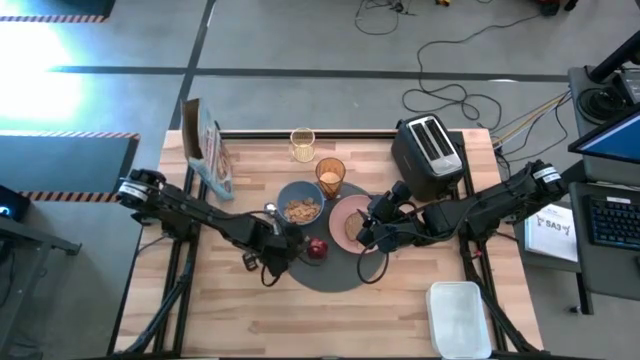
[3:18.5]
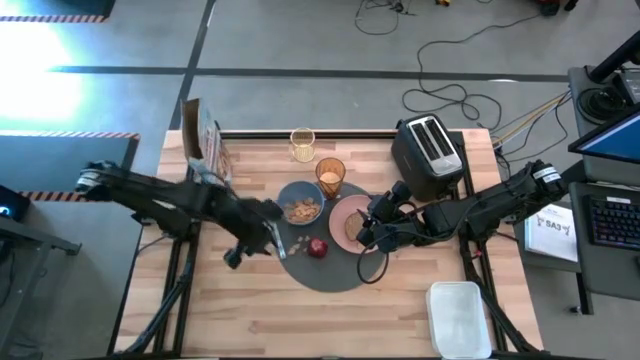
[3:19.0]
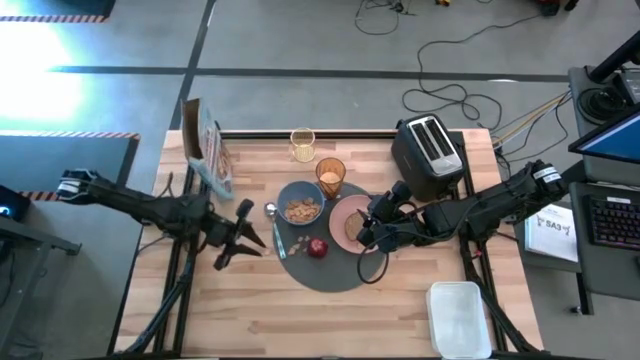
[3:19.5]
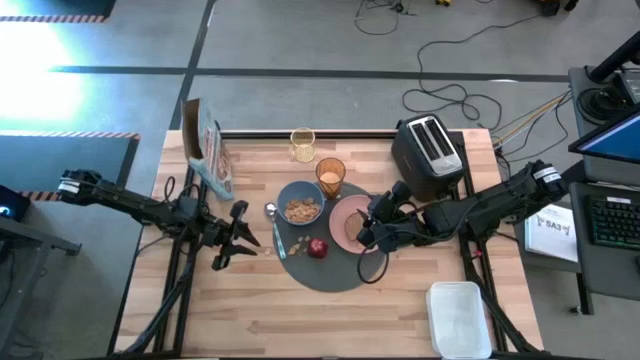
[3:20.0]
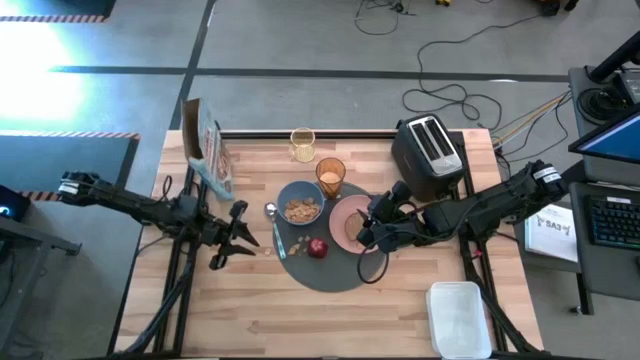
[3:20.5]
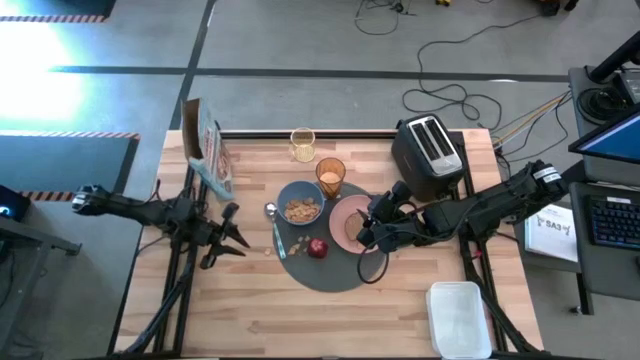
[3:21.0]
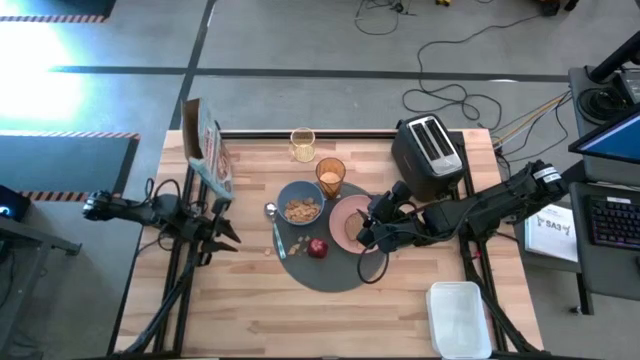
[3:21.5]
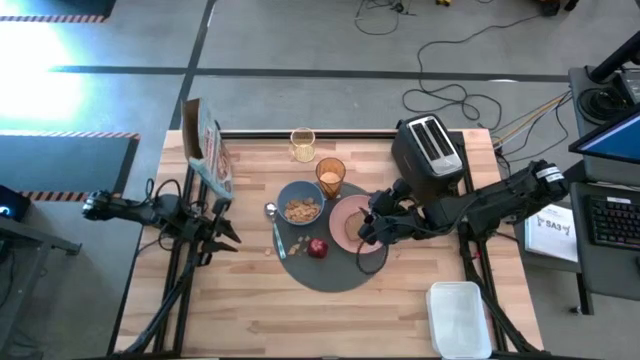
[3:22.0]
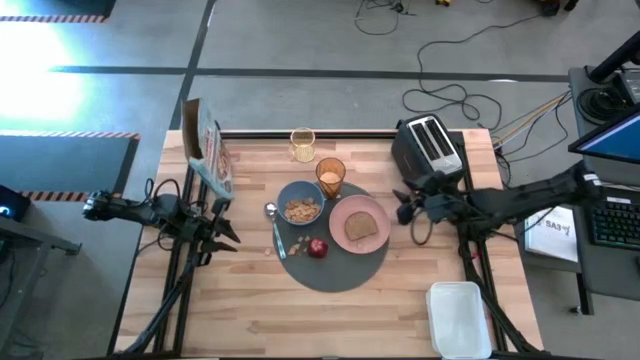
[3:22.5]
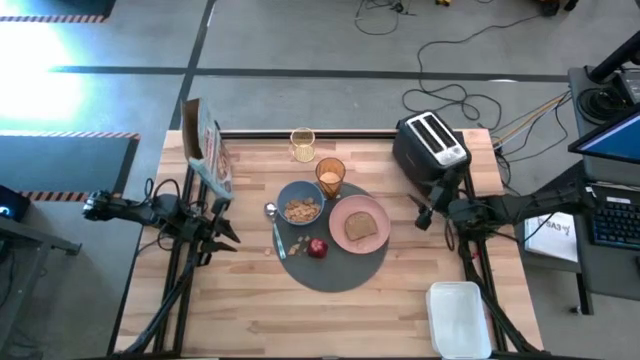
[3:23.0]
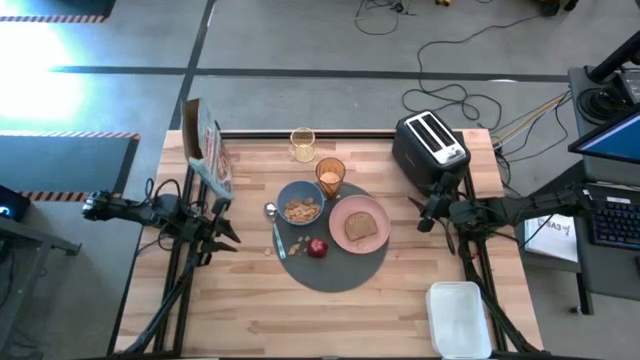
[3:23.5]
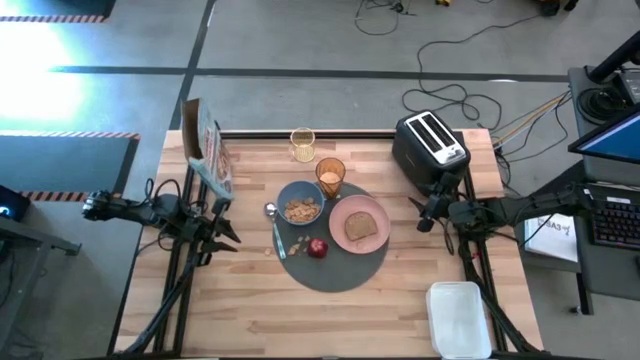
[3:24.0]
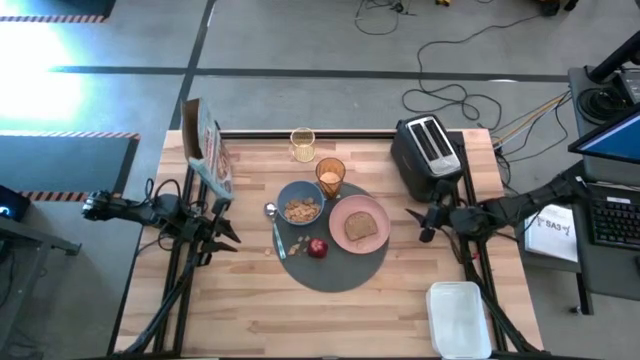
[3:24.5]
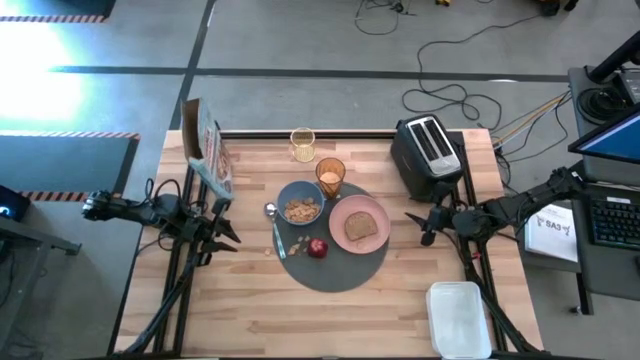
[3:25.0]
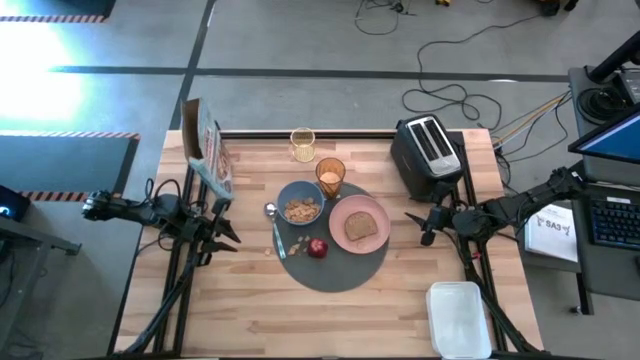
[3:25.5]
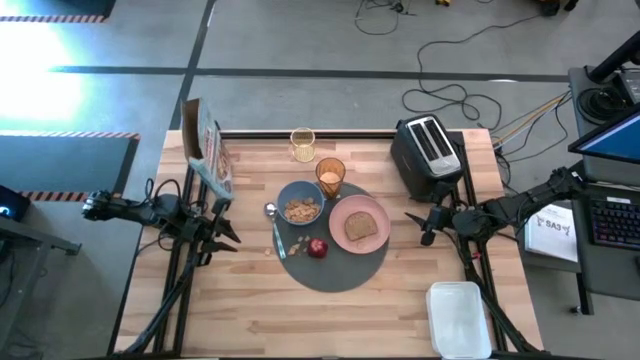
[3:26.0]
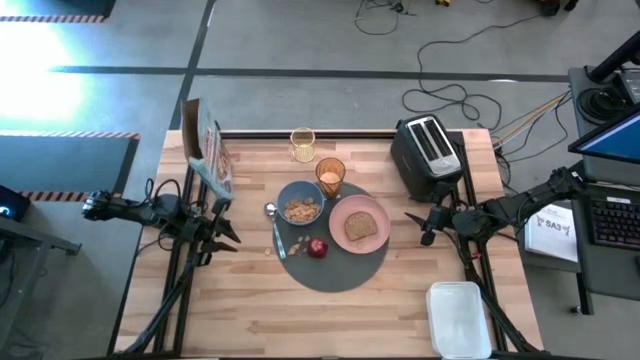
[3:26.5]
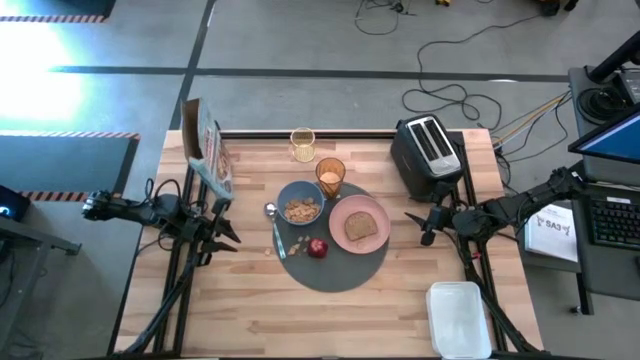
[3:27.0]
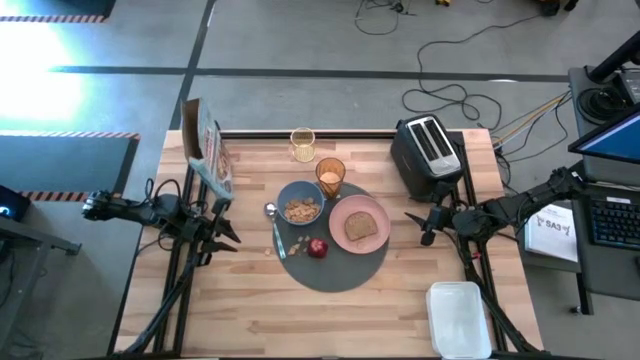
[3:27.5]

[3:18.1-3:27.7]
Task: Arrange a breakfast setting
Return to Home Position

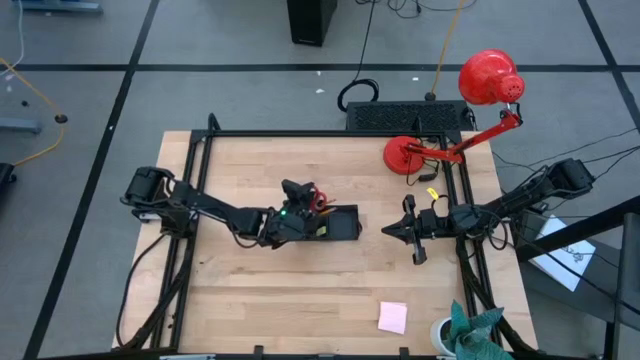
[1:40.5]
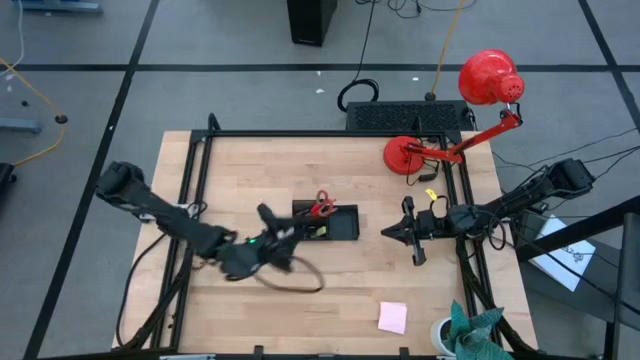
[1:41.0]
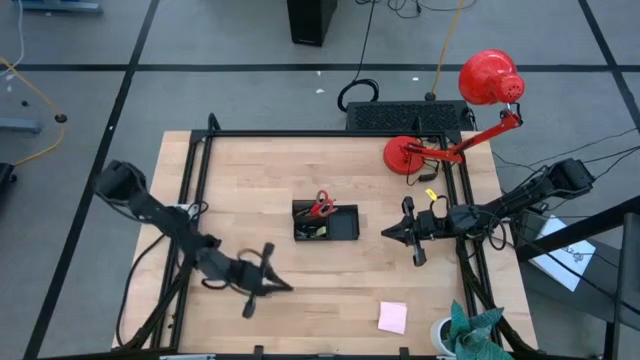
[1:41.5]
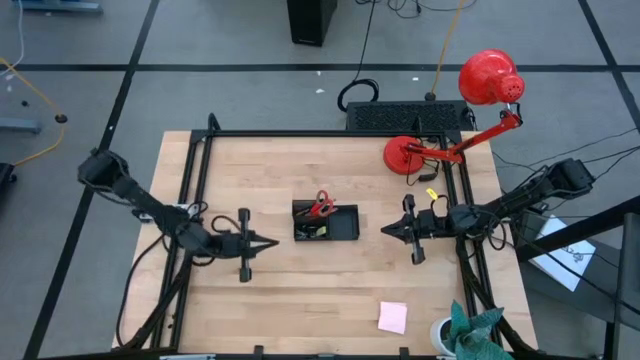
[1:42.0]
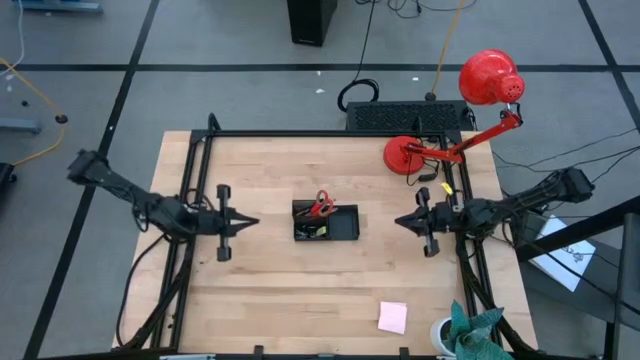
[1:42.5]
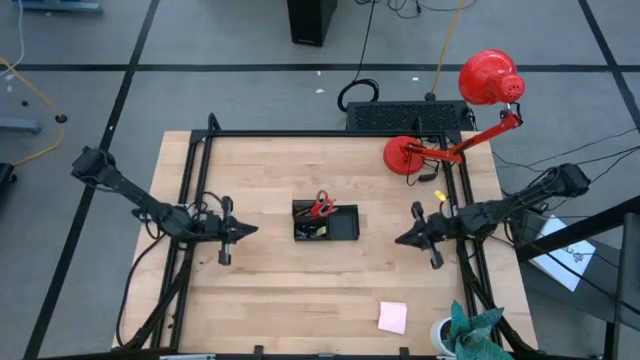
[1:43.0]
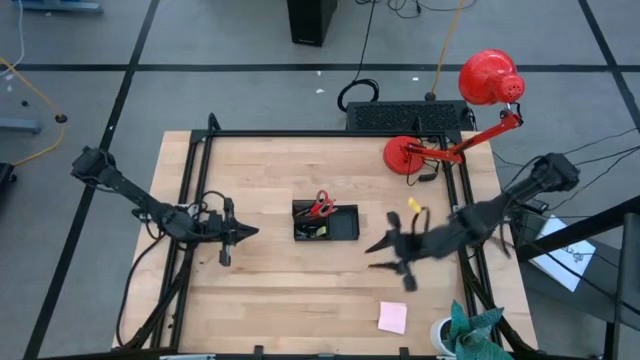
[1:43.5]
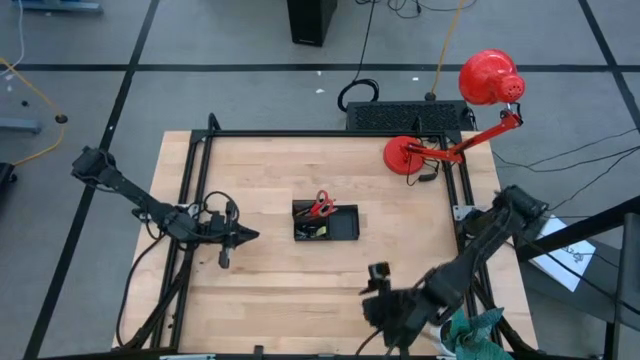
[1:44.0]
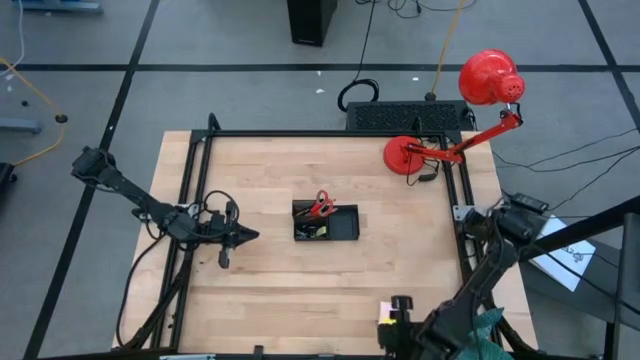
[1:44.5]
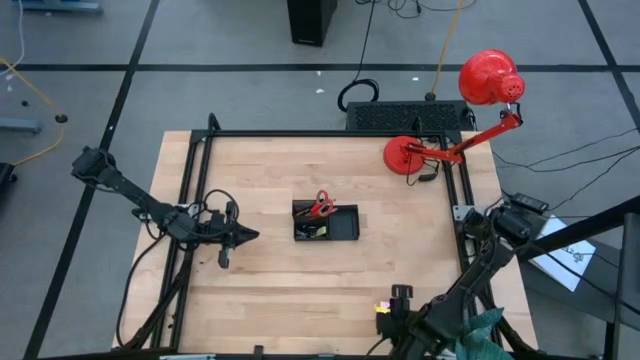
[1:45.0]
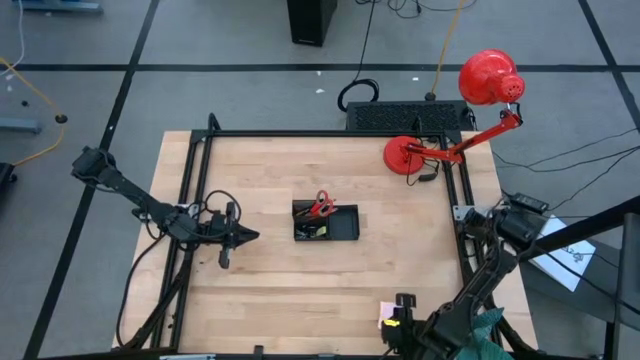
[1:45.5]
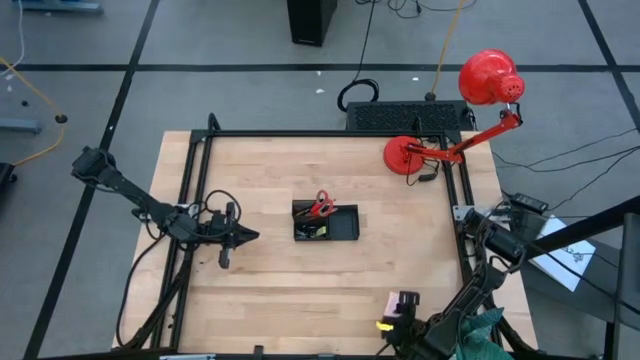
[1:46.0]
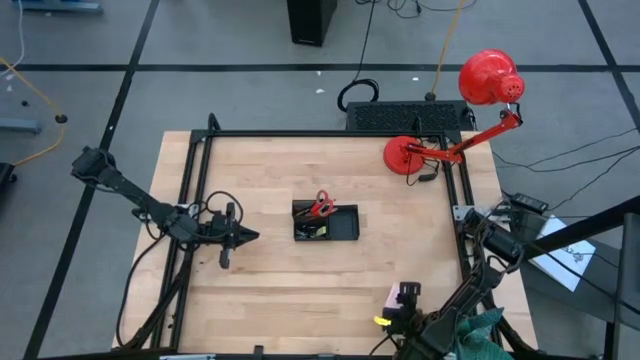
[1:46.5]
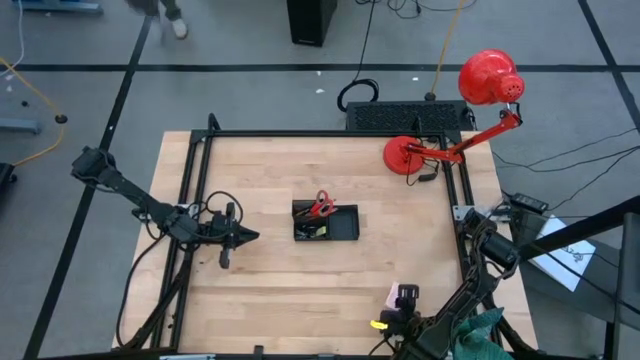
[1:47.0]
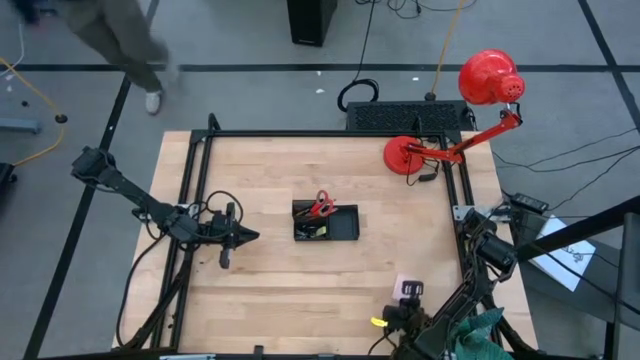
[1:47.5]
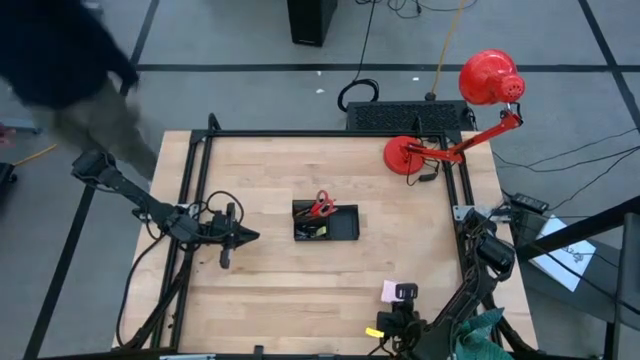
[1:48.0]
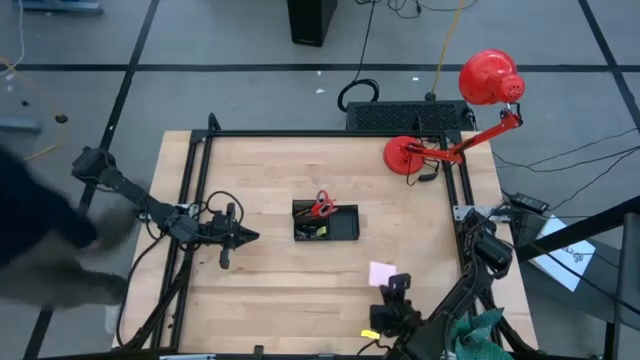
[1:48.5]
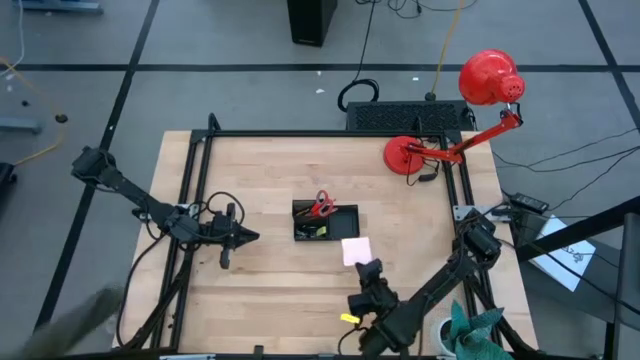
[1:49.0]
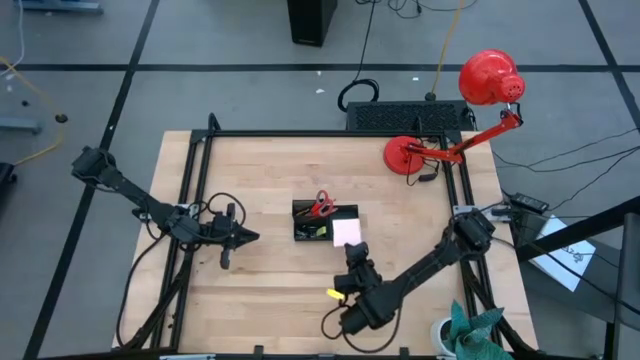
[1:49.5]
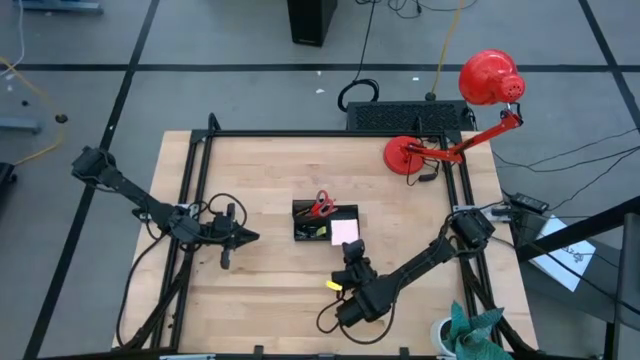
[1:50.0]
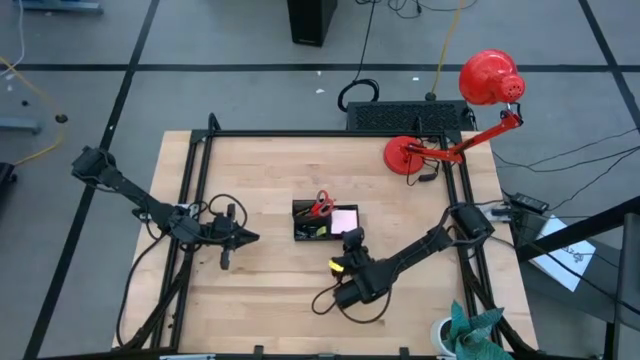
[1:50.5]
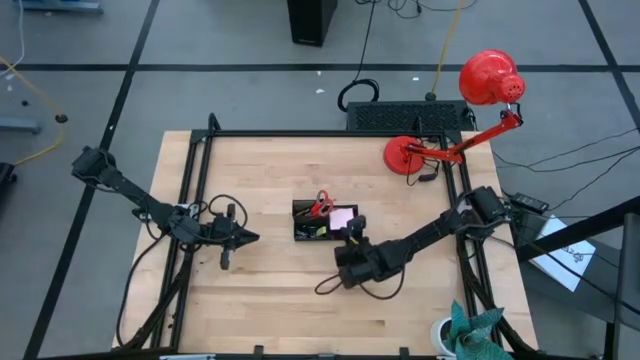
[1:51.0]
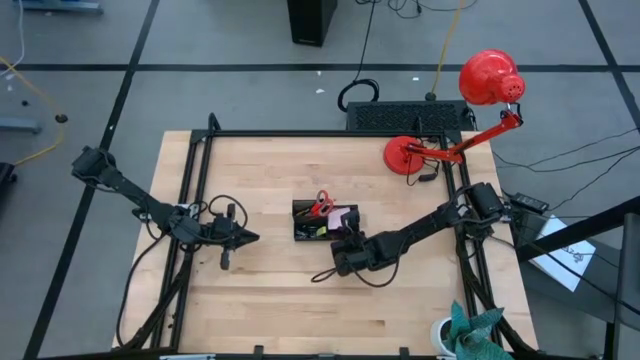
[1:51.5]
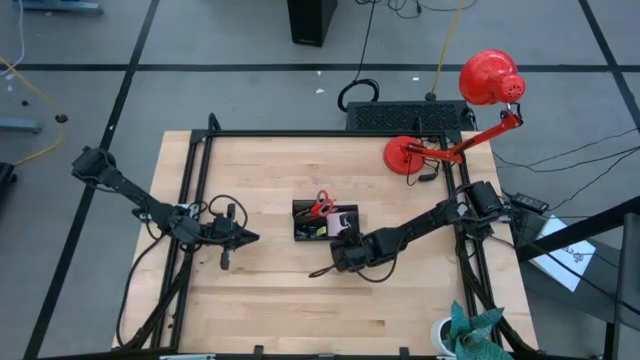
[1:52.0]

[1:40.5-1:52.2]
Task: Pick and place office supplies into organizer
Put the pink sticky notes into the desk organizer
